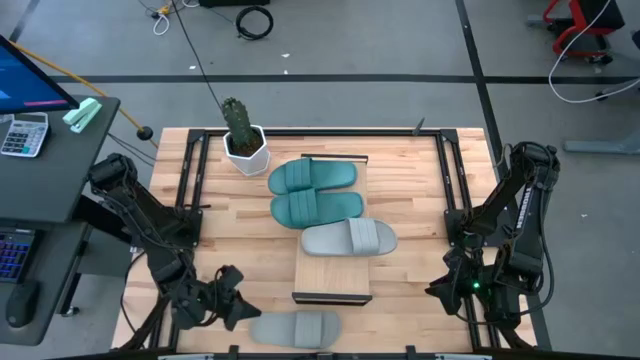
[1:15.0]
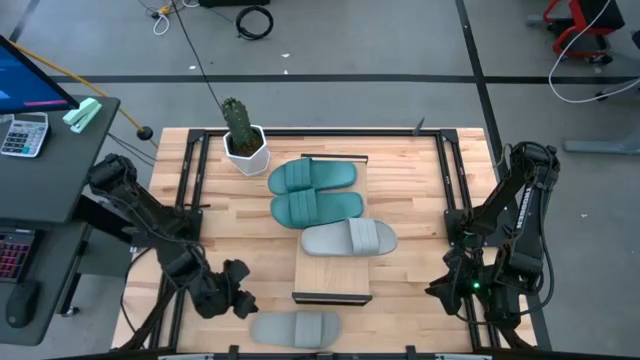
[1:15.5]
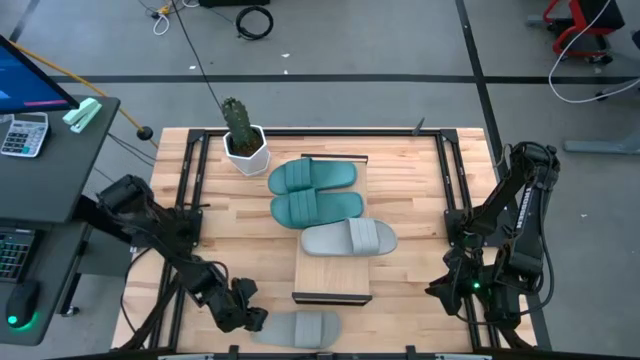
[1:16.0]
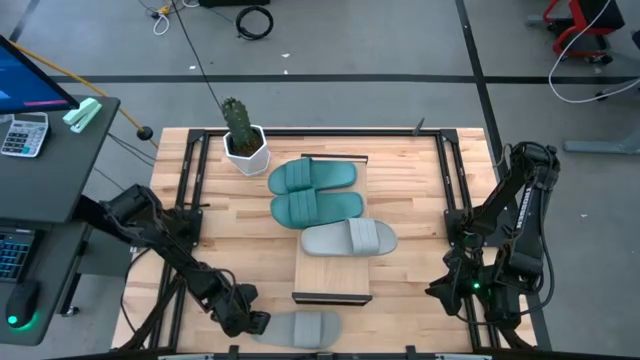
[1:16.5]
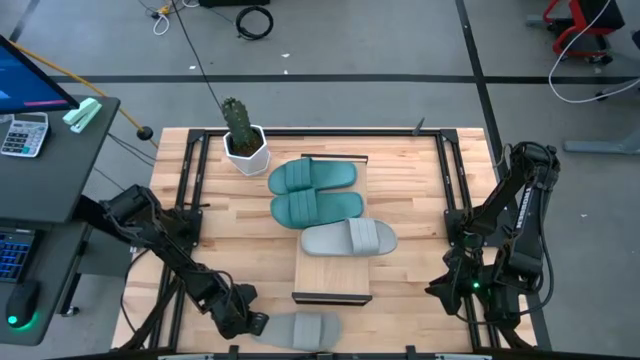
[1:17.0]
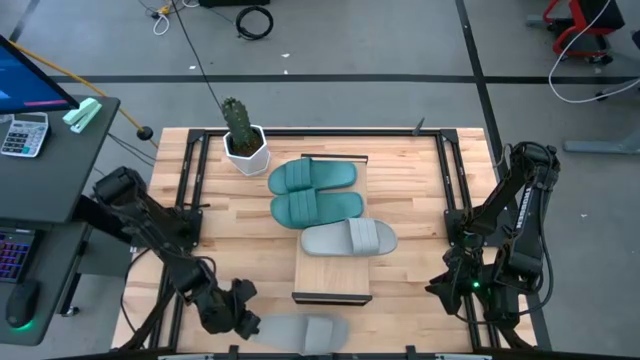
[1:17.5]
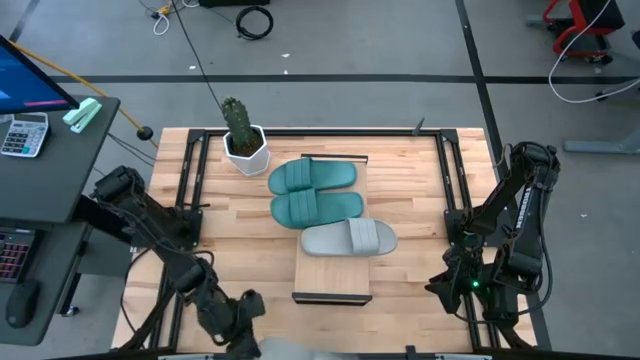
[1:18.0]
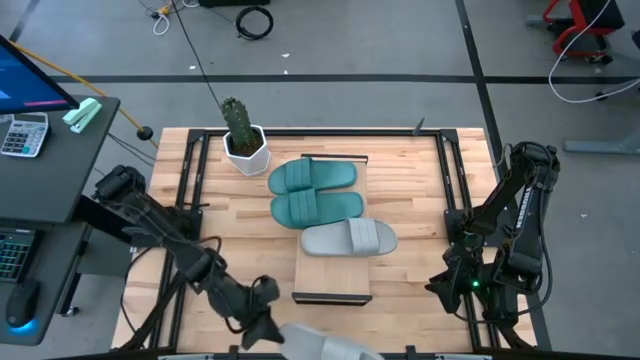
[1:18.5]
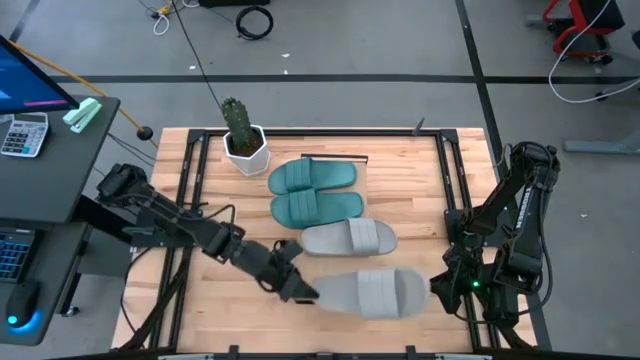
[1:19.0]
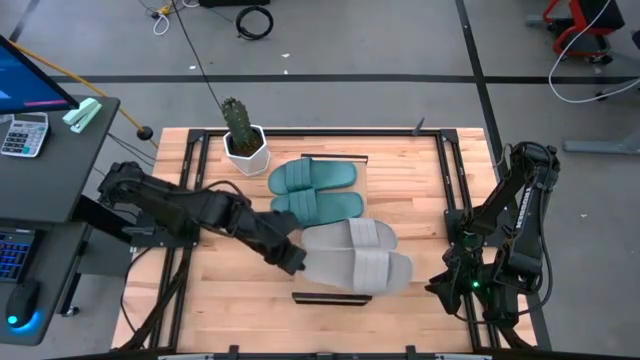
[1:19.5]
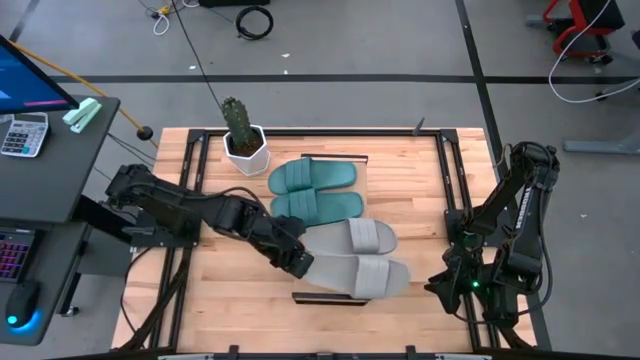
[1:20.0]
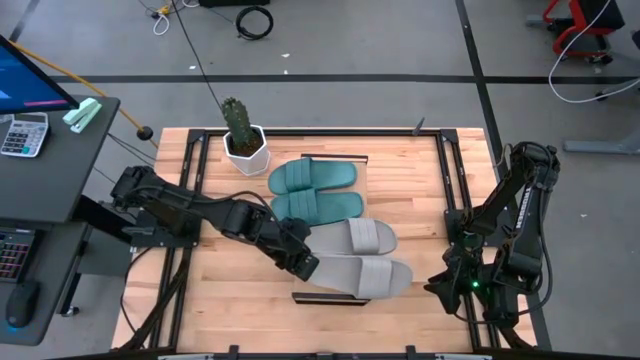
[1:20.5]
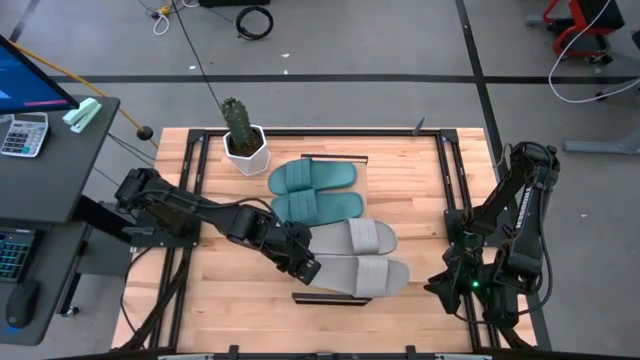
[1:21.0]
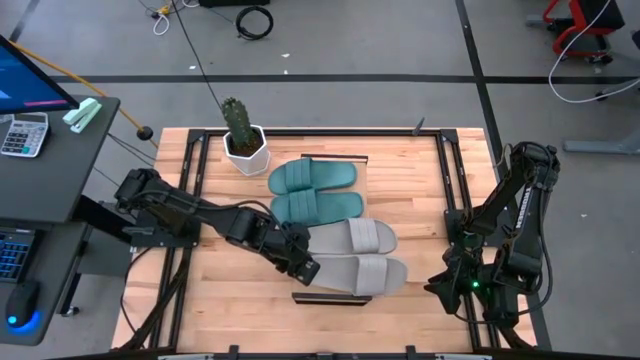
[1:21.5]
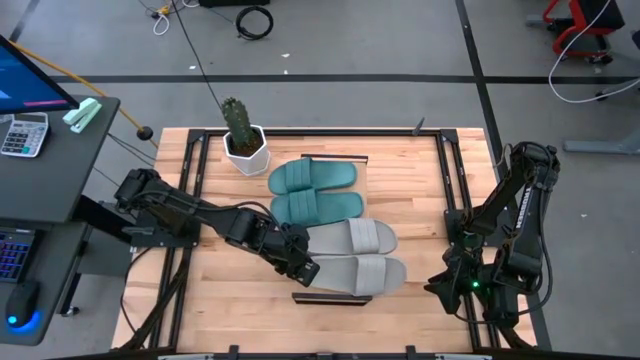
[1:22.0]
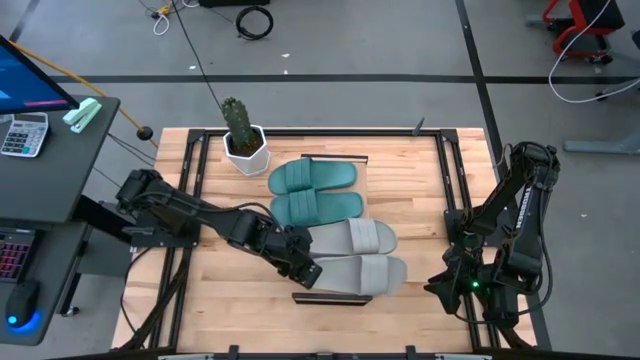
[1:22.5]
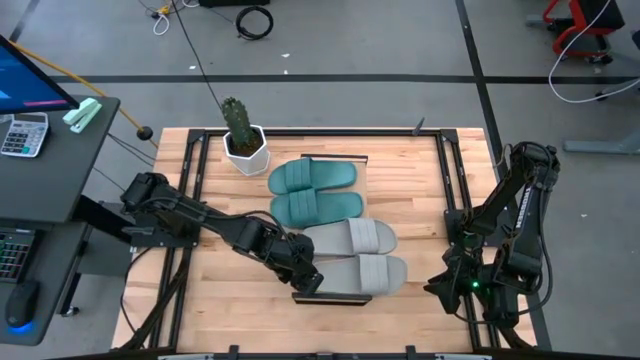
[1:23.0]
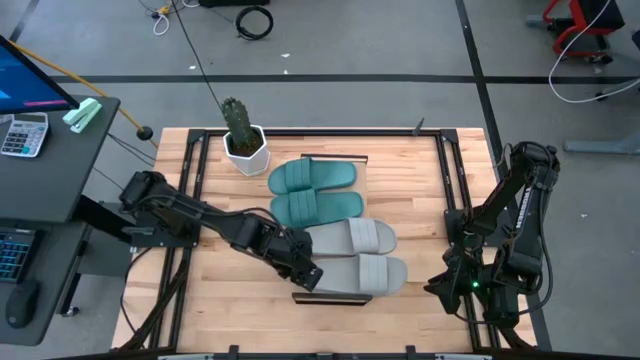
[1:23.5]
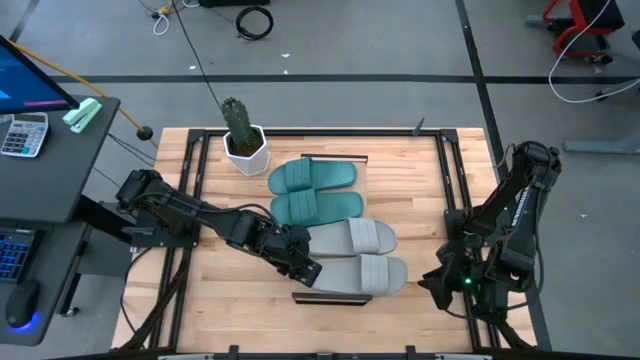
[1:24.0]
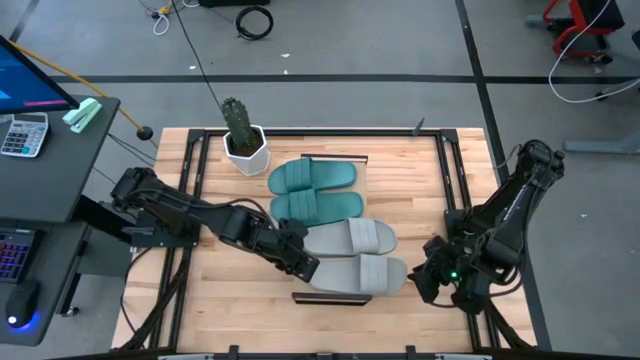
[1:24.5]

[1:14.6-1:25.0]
Task: Pick and place slides into the shelf
Put the gray slide on the shelf

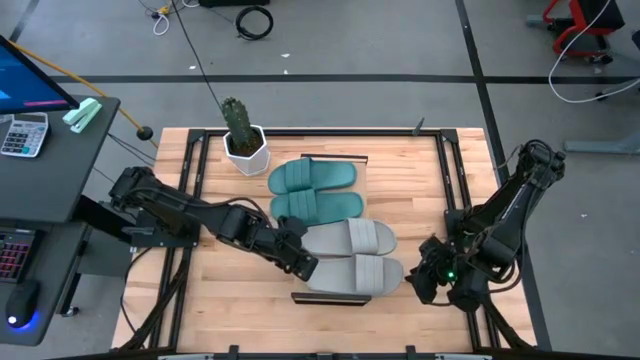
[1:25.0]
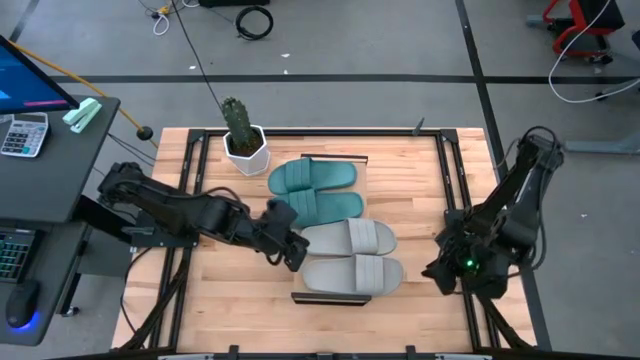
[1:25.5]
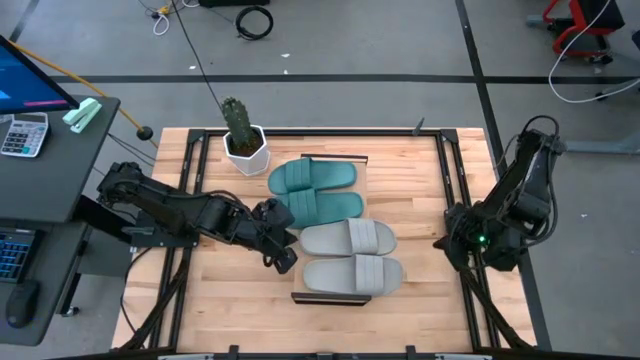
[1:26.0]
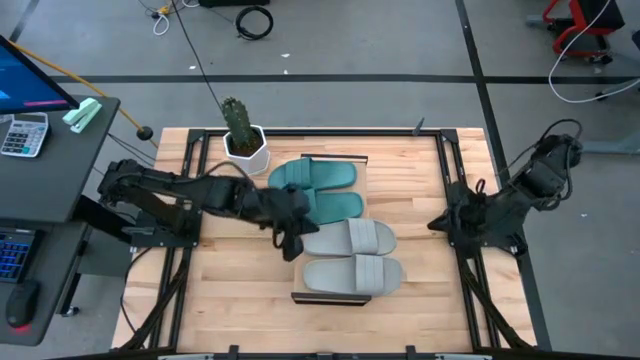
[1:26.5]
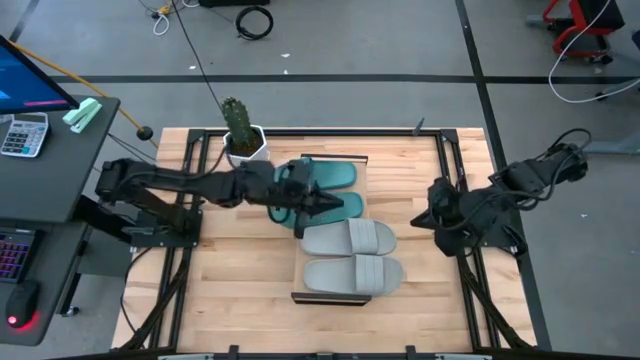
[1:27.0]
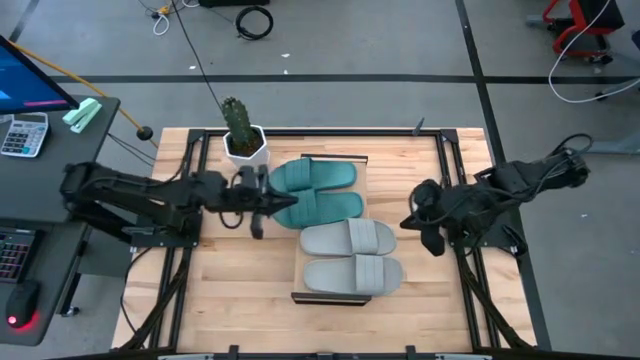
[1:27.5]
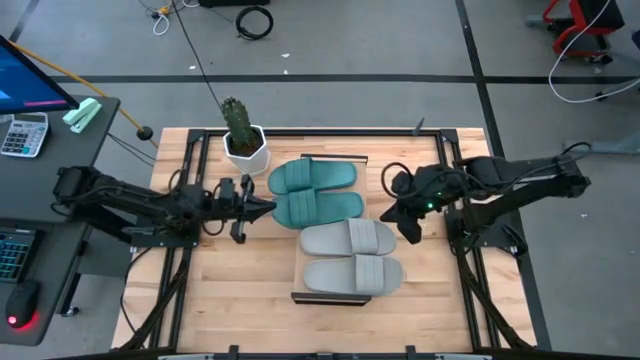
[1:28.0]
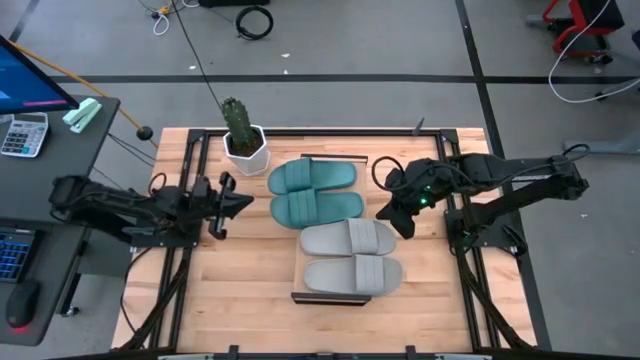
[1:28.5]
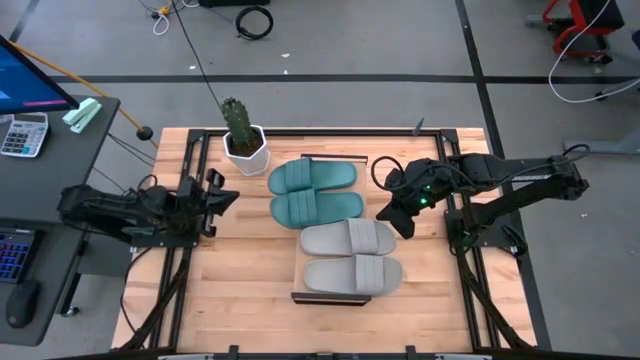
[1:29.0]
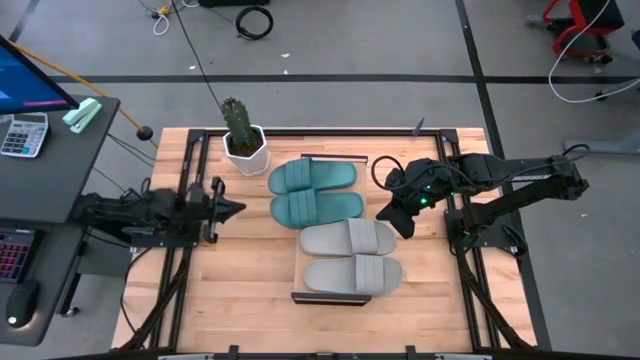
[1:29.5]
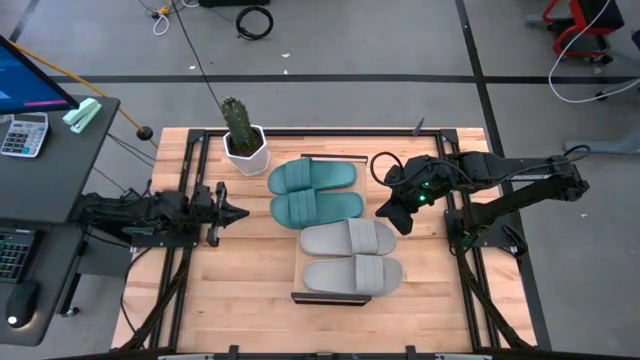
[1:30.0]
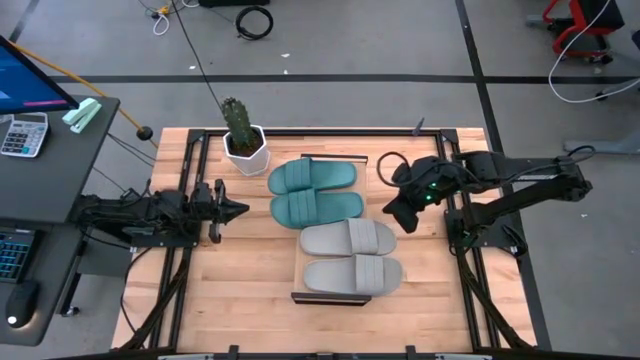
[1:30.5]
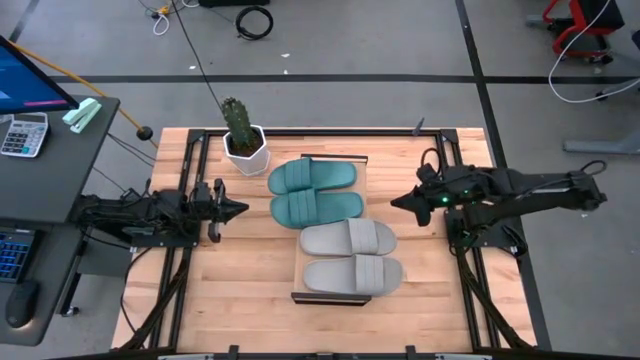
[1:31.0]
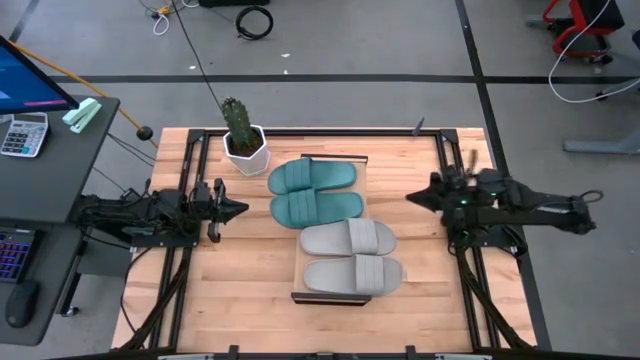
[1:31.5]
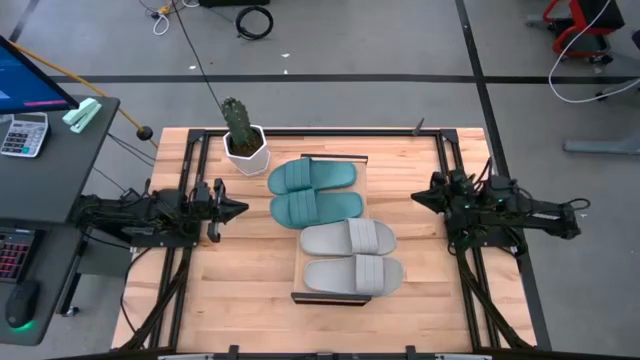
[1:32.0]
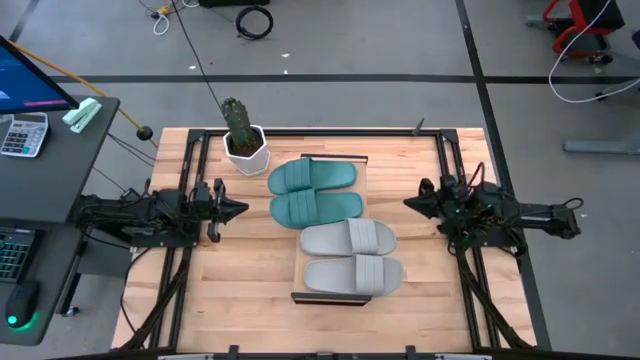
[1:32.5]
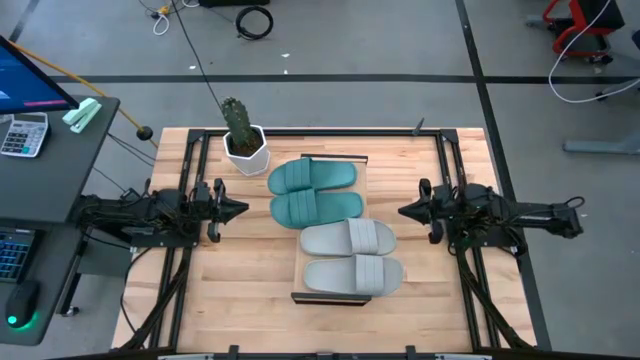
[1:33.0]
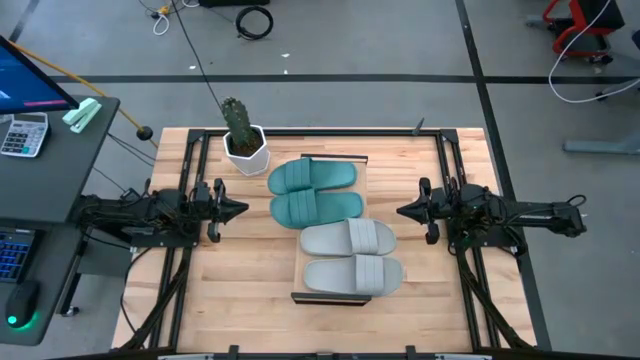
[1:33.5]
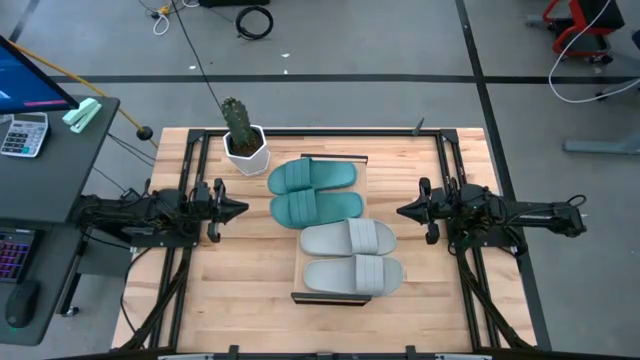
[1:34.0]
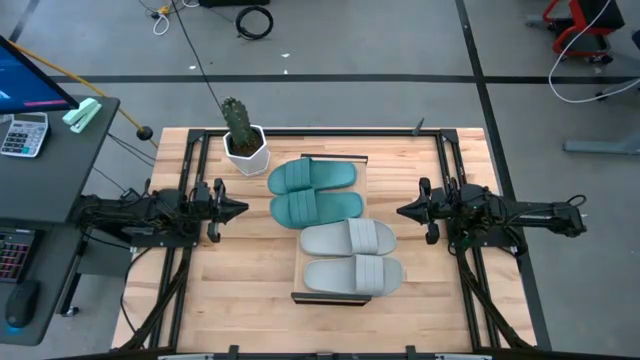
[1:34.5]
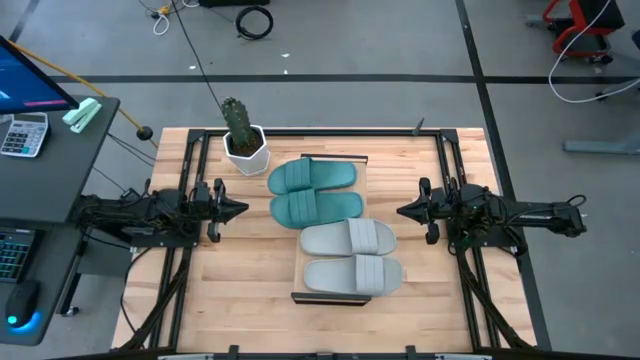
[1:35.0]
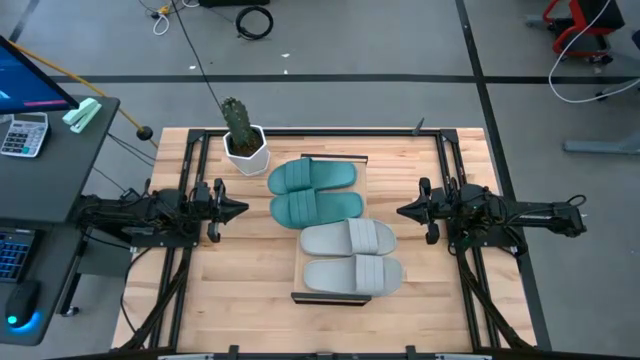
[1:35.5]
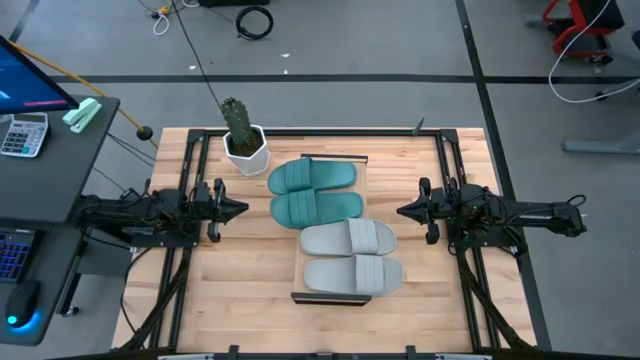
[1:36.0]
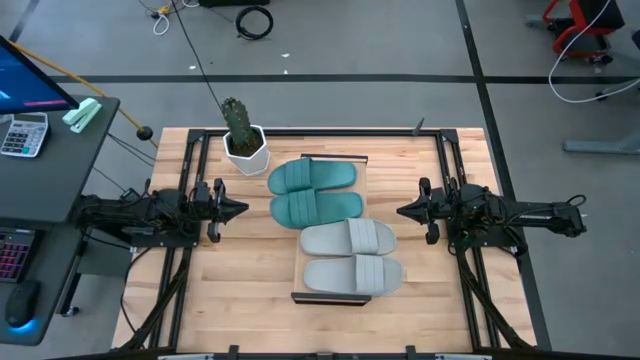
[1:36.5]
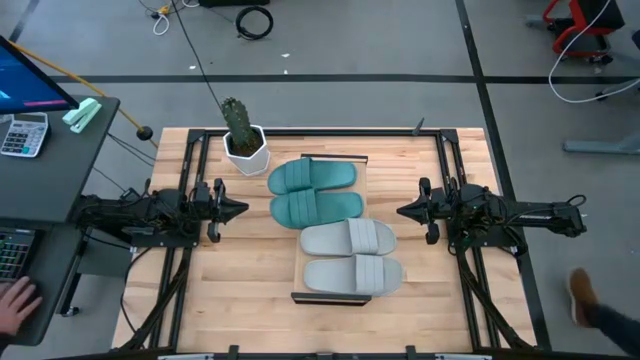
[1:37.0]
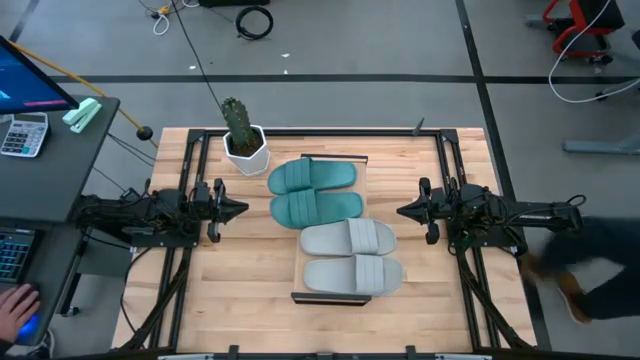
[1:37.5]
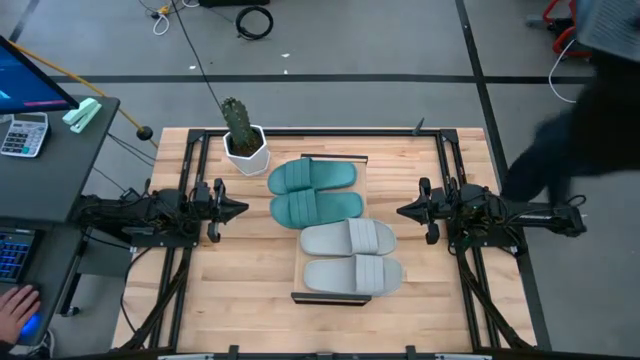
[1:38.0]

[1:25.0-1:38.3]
Return to Home Position
